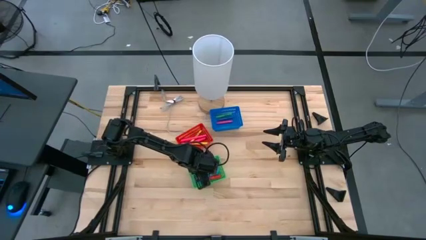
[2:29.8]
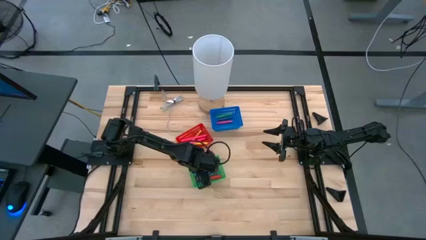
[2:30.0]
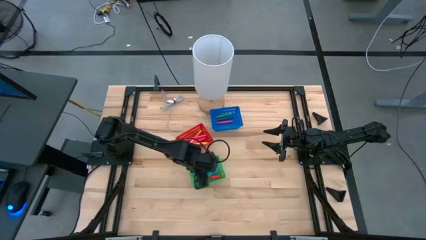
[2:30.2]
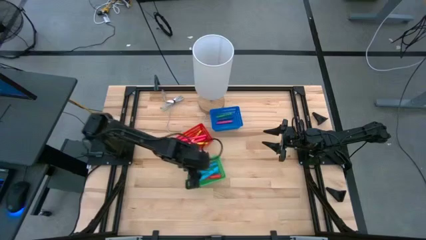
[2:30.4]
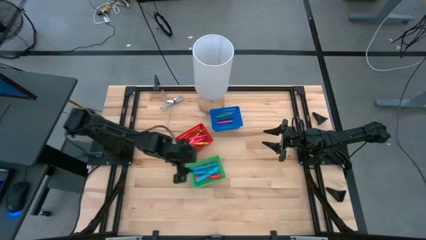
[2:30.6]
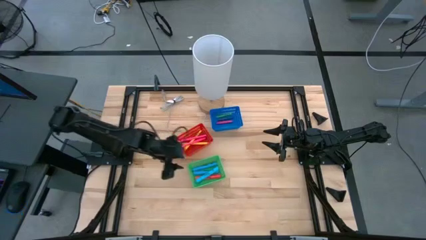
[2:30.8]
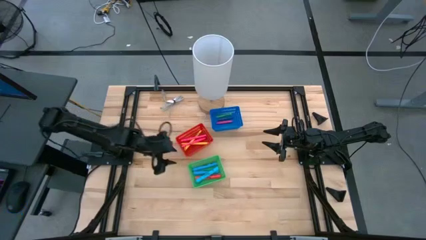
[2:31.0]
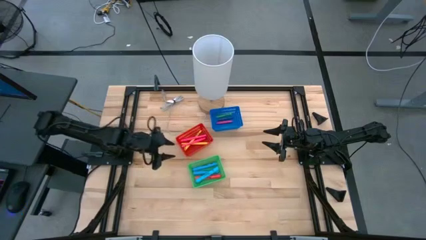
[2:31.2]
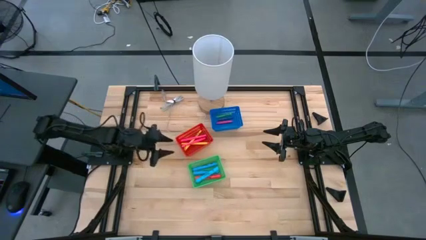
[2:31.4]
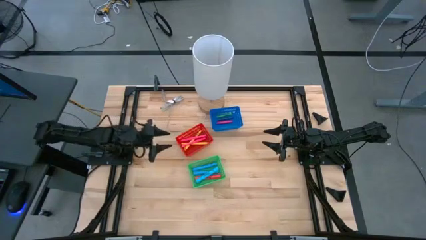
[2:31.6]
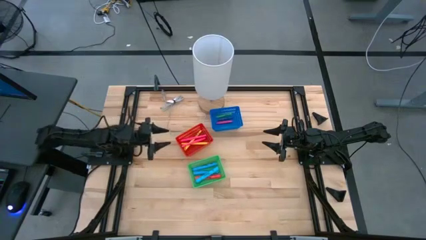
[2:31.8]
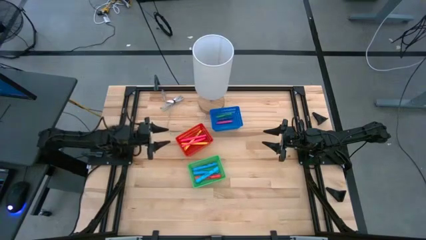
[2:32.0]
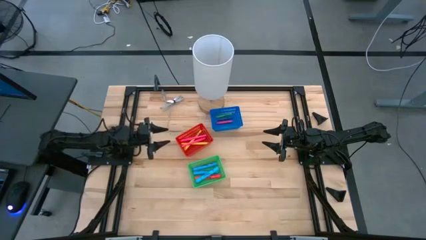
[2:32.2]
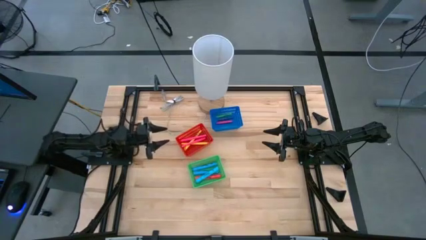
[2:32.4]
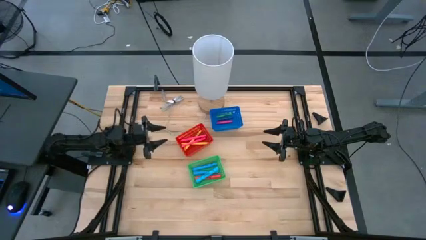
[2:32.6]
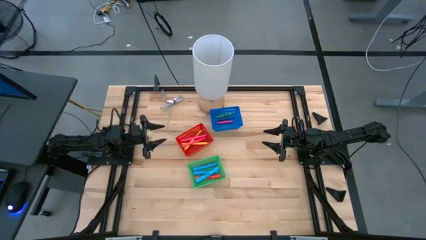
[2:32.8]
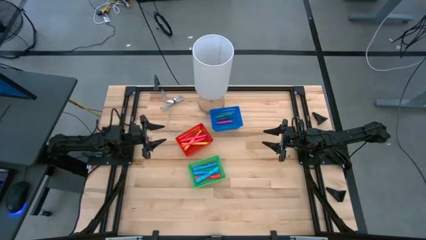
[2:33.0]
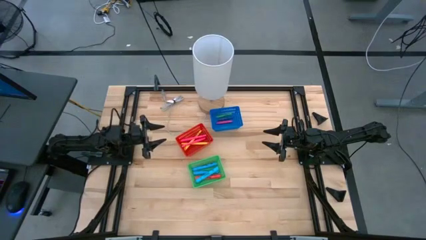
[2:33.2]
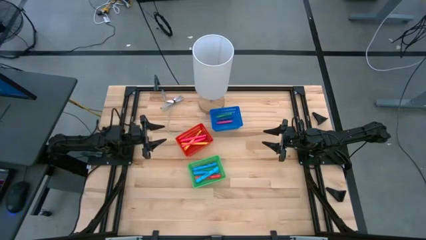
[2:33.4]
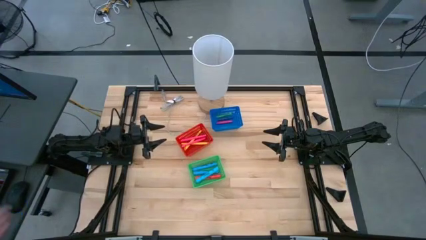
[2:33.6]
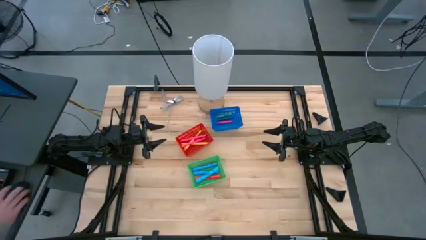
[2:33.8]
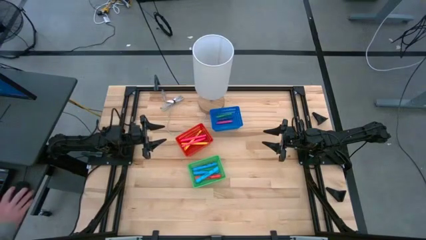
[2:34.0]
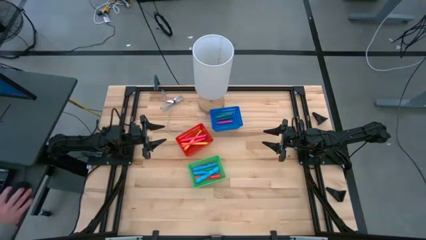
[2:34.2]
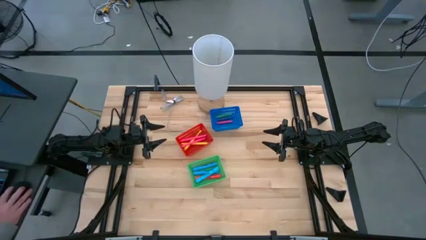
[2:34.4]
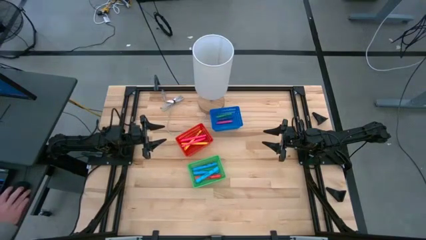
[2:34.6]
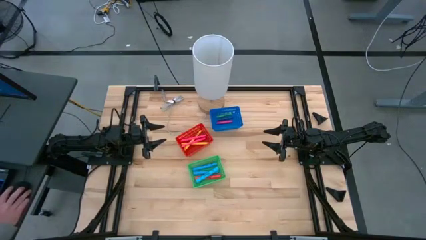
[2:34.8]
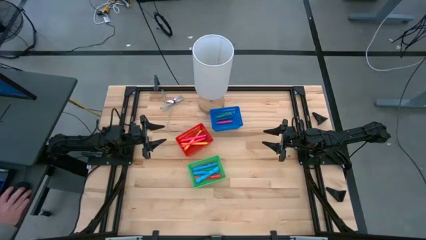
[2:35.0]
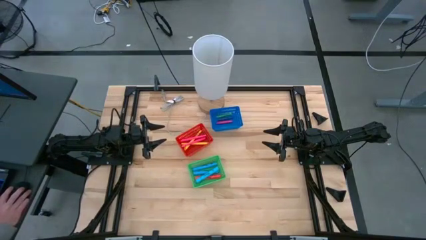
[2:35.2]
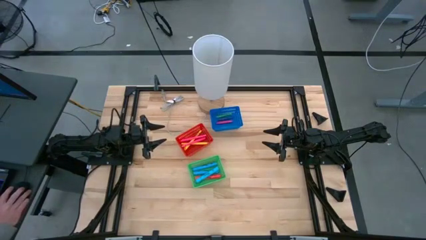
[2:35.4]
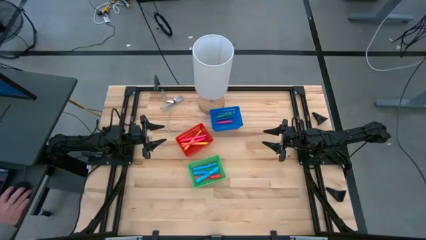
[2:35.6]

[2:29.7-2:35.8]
Task: Pick & Place Markers
Return to Home Position

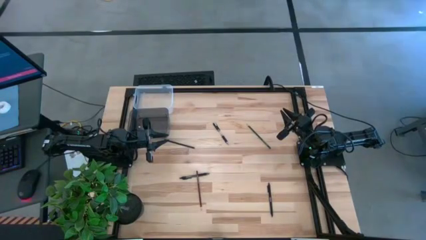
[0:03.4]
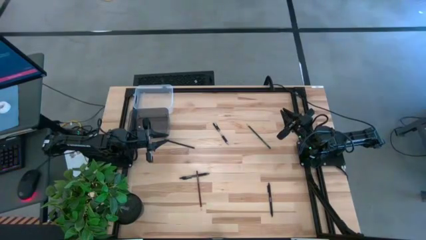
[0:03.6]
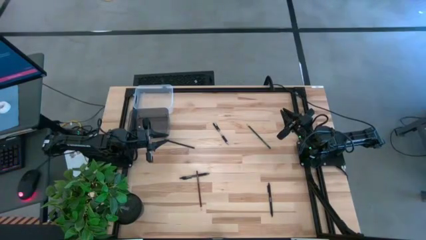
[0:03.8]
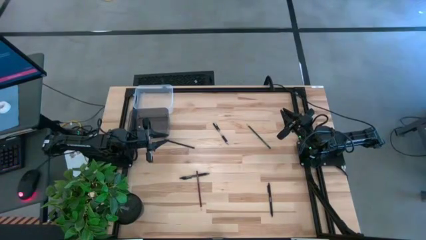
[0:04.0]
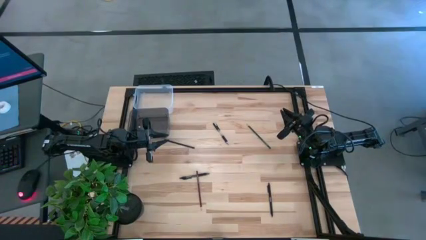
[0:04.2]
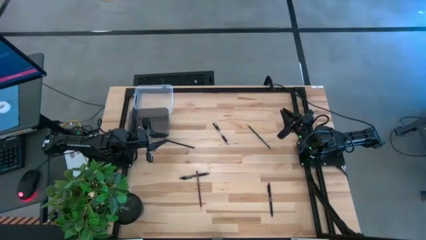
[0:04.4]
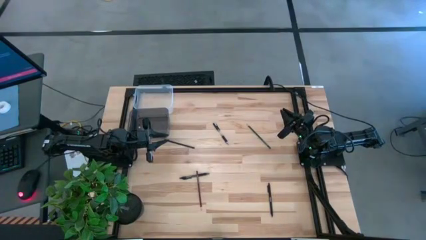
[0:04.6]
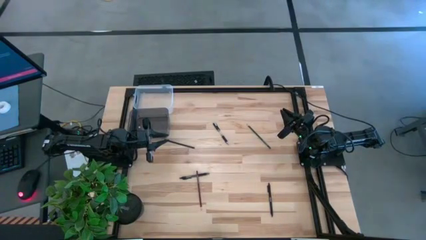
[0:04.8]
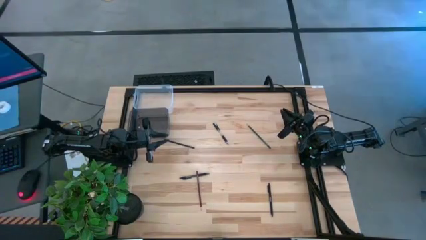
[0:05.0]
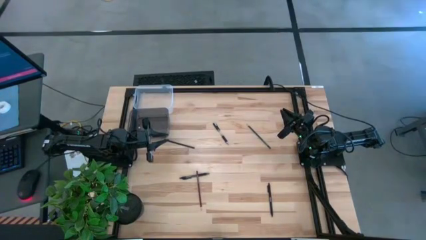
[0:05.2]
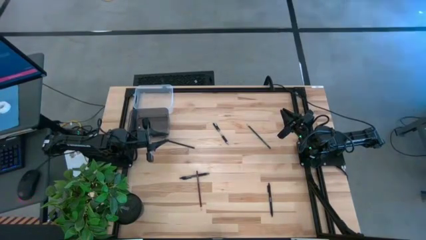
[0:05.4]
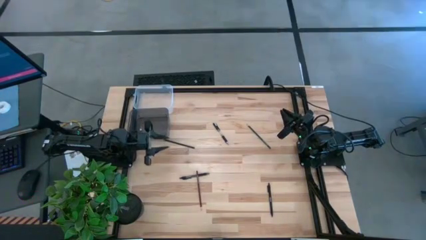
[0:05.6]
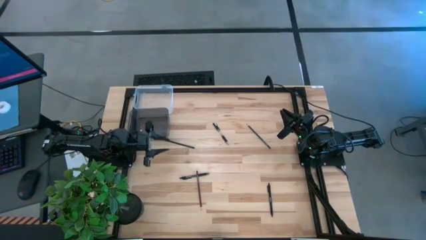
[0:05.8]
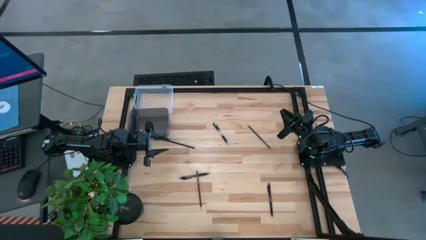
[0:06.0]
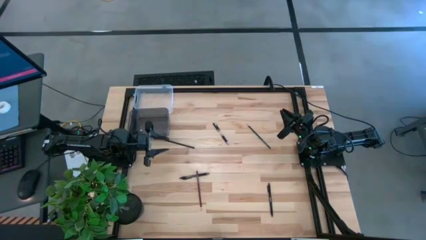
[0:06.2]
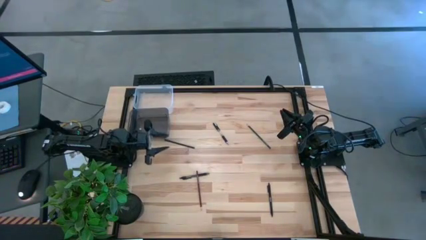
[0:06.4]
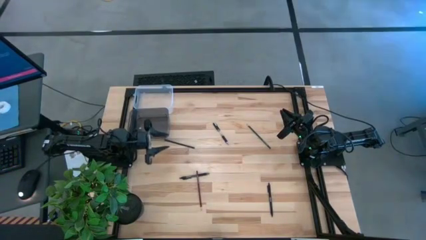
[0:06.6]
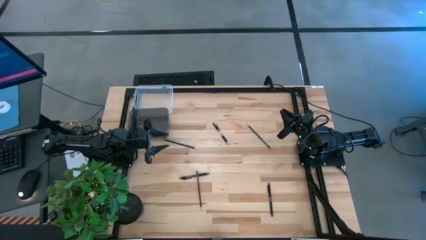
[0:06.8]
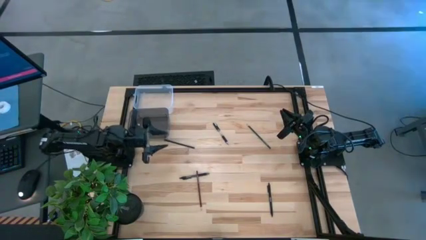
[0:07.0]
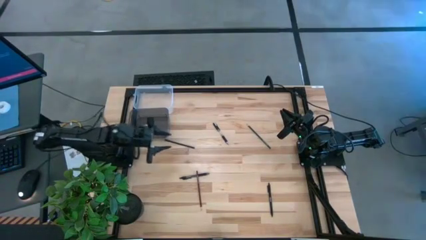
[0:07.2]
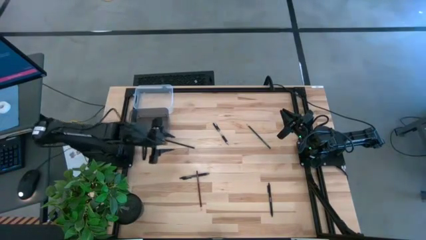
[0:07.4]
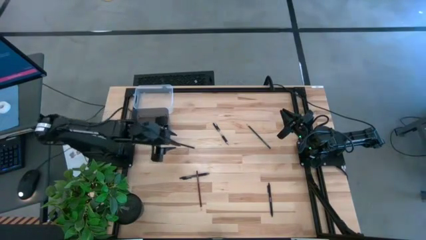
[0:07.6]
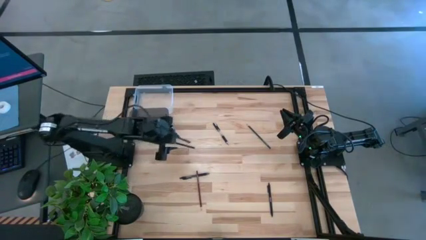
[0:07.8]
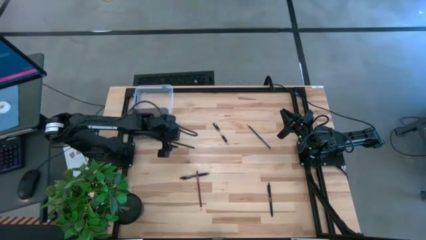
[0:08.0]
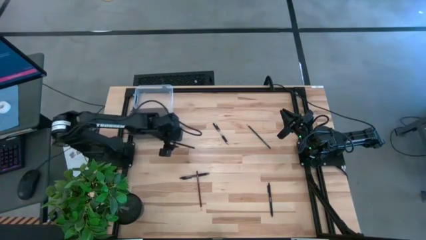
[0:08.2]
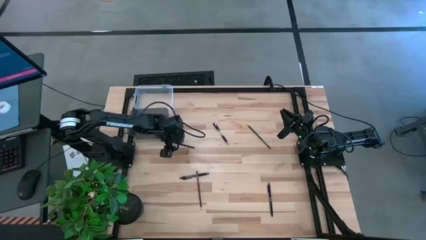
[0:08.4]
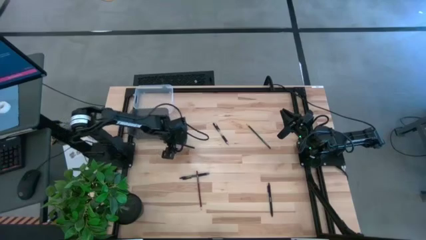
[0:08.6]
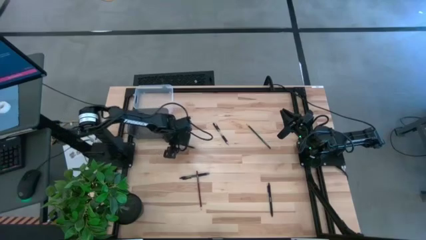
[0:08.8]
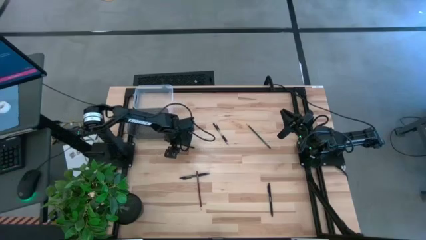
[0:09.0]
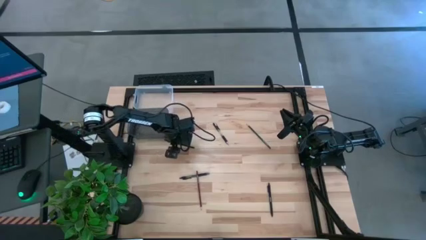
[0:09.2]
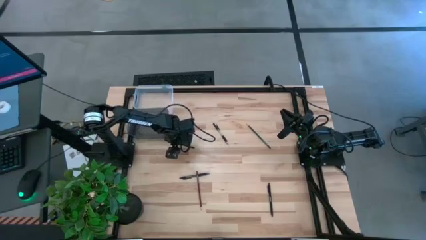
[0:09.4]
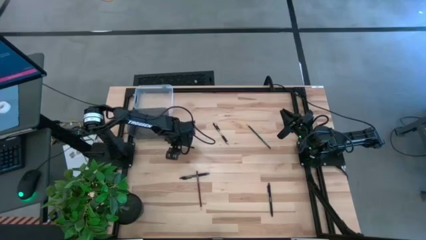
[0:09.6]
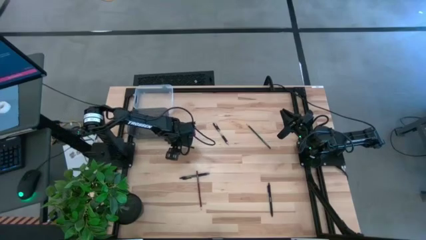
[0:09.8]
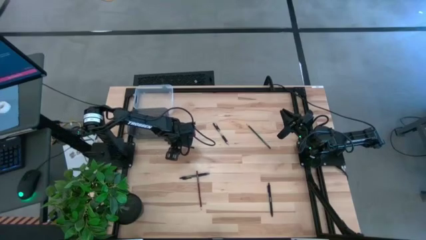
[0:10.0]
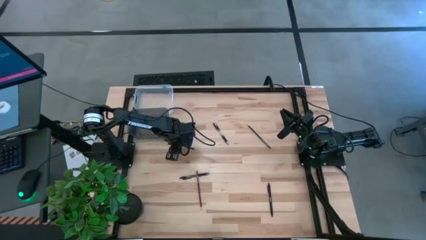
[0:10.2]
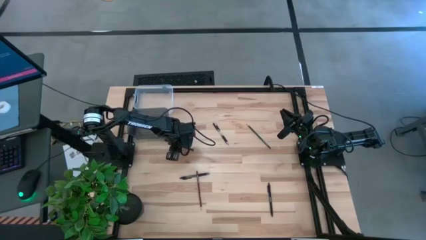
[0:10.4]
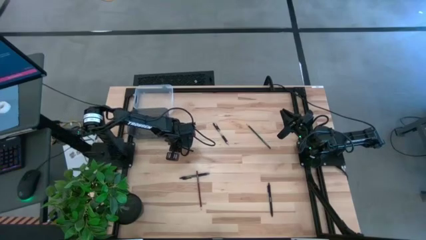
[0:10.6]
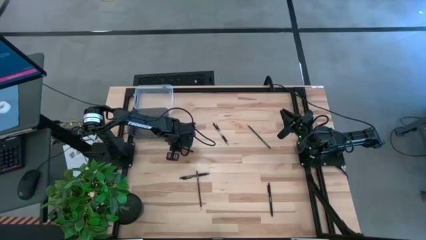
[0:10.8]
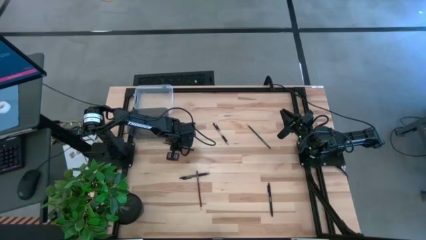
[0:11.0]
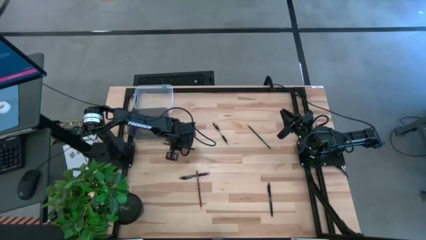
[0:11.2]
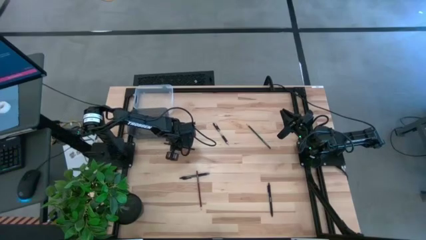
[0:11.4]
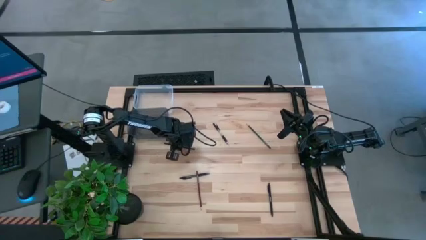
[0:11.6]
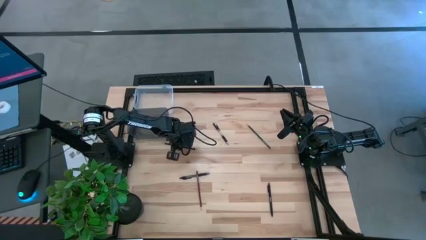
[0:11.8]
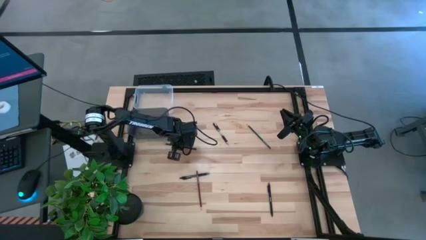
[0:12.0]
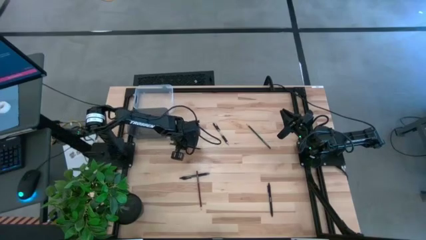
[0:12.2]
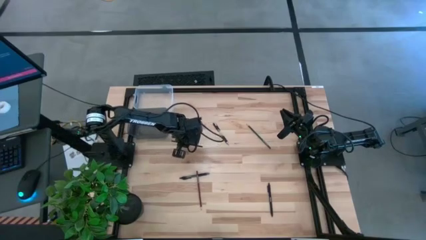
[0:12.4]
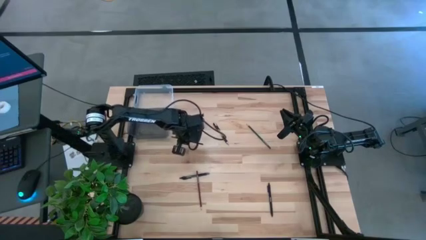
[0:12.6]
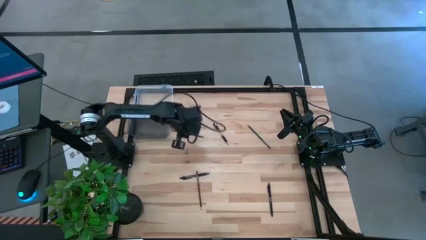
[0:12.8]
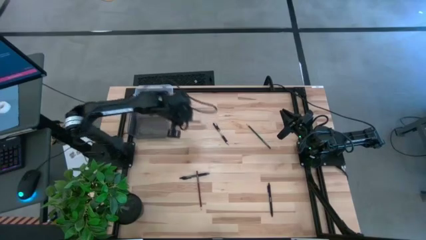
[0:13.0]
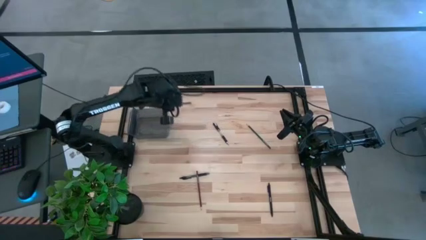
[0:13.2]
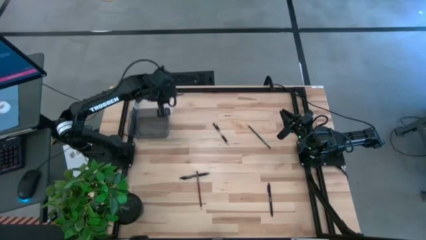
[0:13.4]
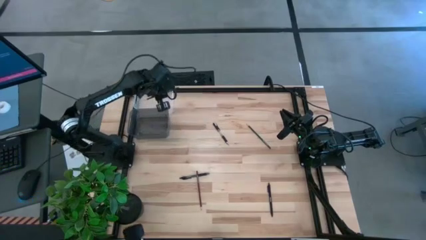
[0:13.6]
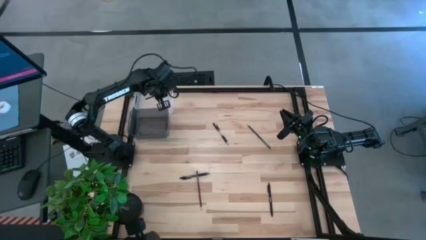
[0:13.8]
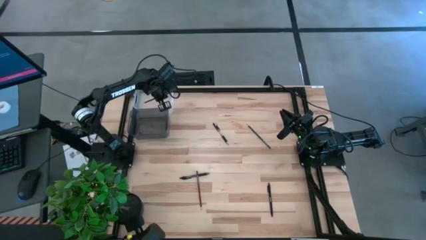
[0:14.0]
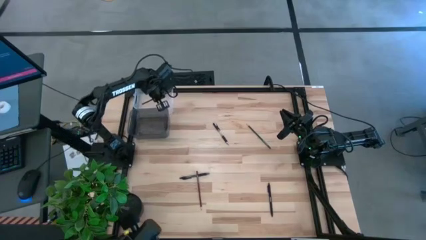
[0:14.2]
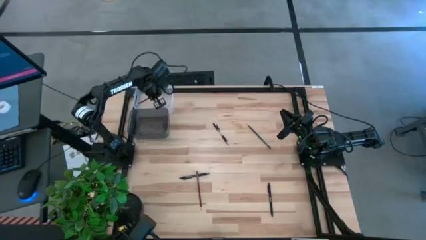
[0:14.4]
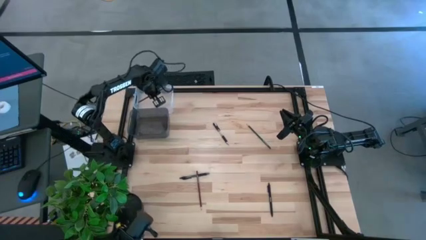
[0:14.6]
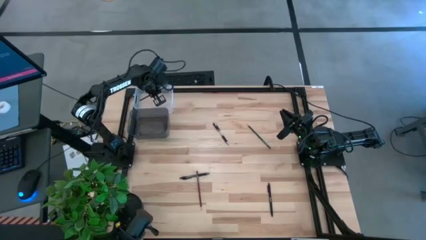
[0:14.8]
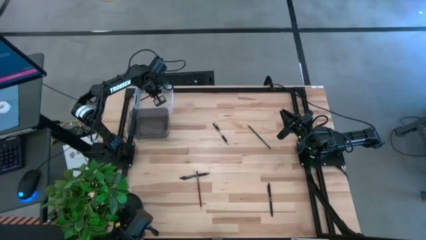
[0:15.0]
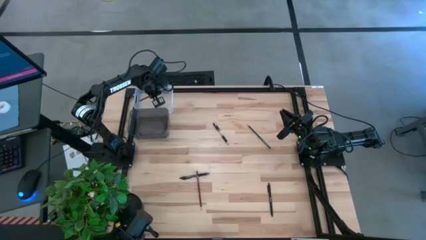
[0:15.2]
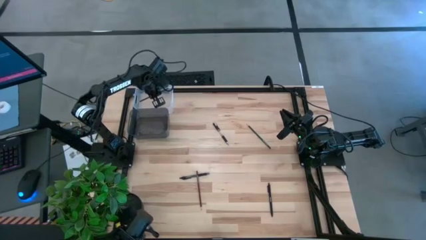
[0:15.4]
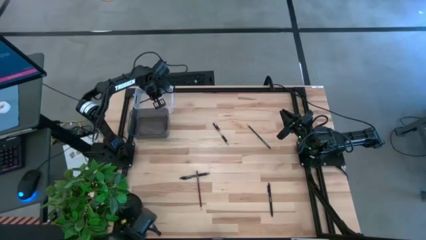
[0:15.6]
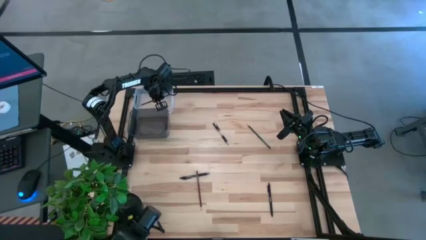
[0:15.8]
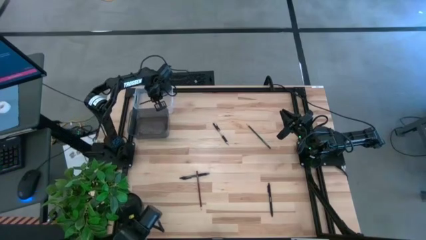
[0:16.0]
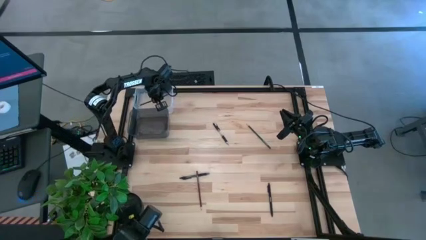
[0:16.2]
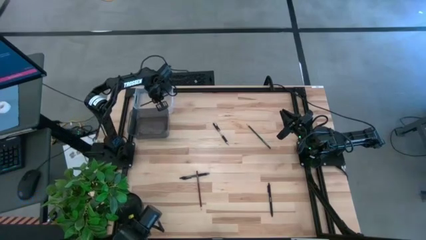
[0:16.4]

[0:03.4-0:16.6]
Task: Sort pens & pencils
Put the black pencil into the white bin
